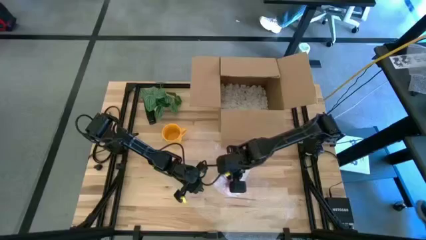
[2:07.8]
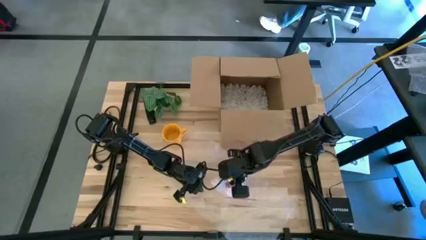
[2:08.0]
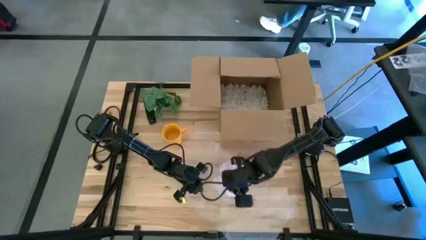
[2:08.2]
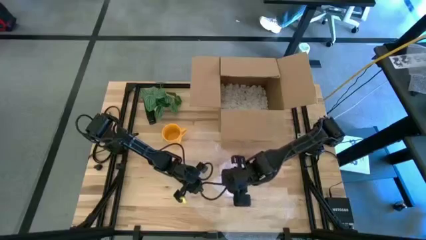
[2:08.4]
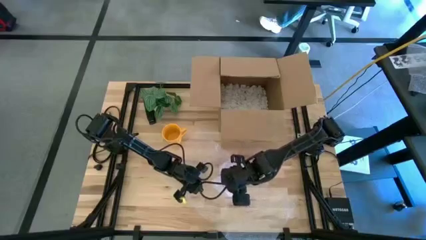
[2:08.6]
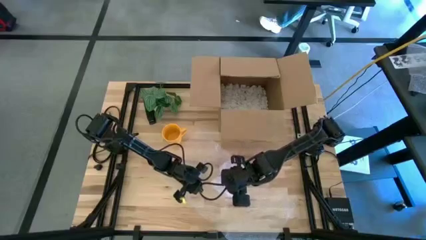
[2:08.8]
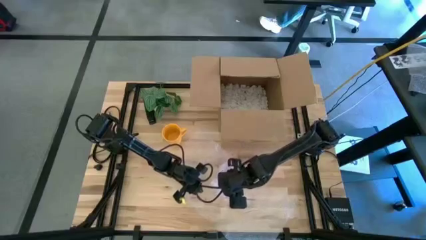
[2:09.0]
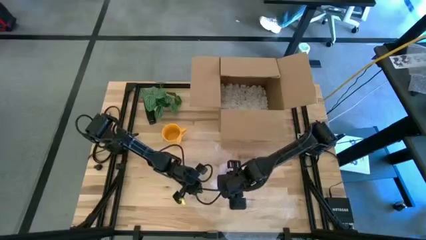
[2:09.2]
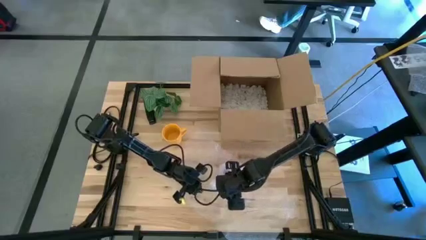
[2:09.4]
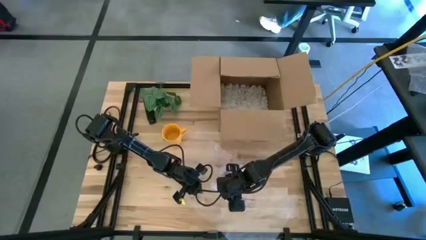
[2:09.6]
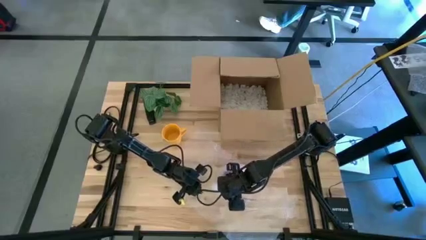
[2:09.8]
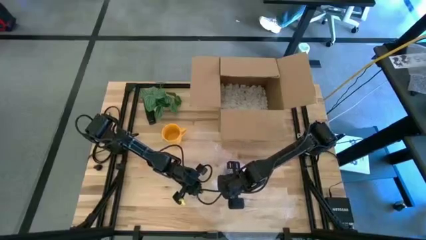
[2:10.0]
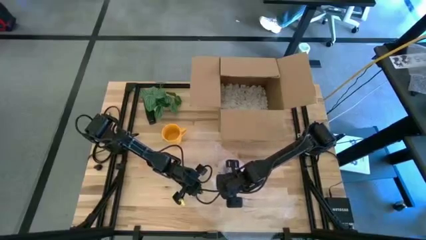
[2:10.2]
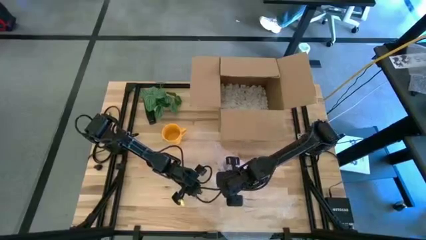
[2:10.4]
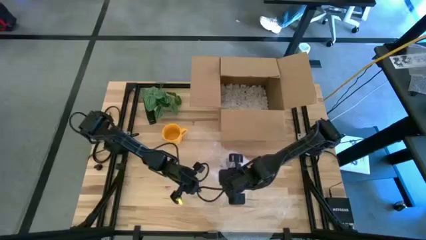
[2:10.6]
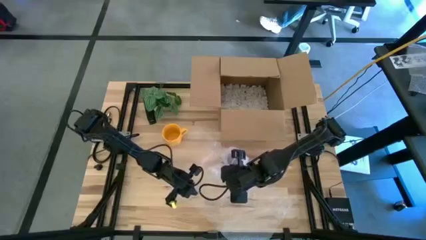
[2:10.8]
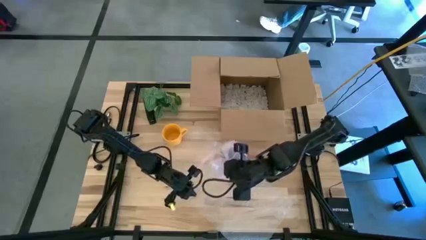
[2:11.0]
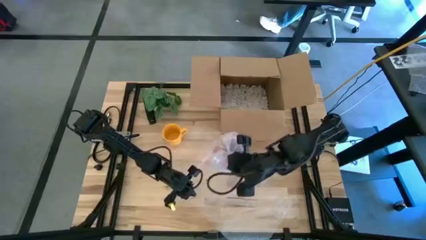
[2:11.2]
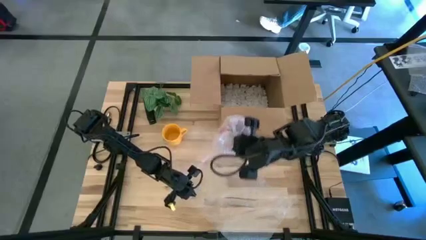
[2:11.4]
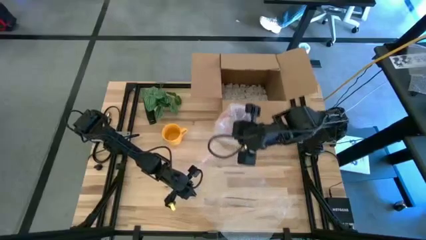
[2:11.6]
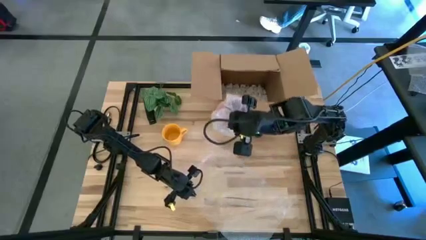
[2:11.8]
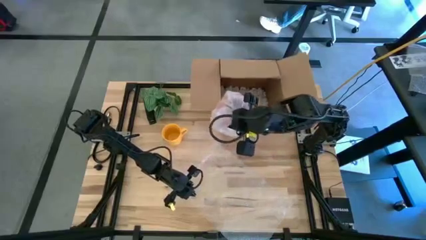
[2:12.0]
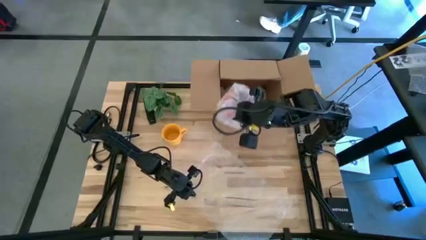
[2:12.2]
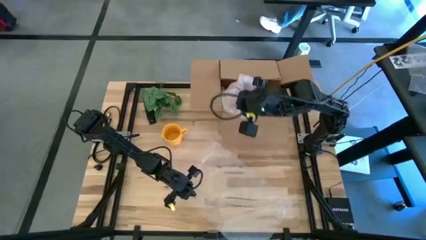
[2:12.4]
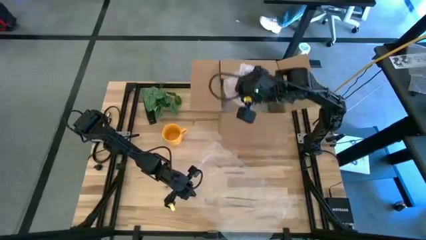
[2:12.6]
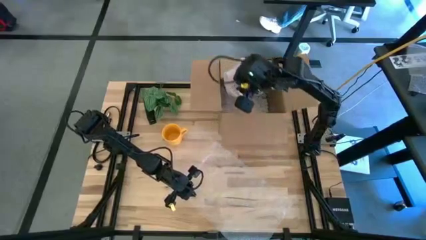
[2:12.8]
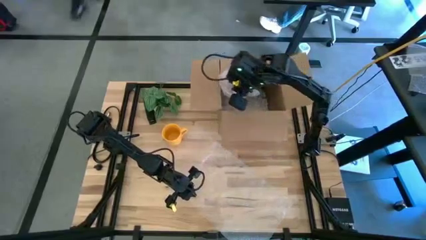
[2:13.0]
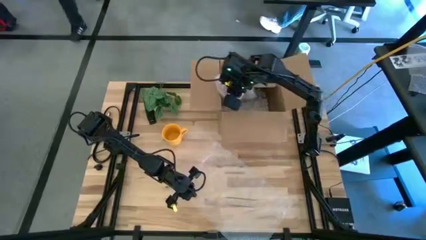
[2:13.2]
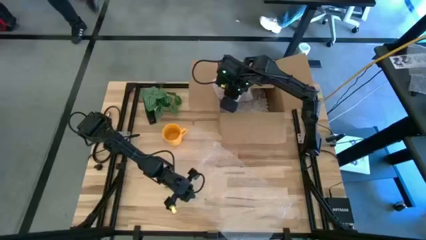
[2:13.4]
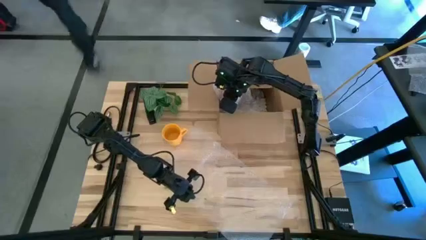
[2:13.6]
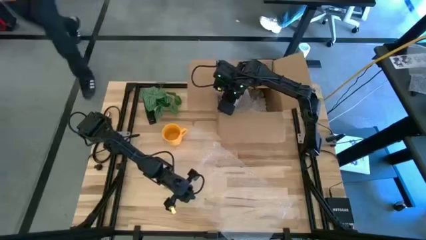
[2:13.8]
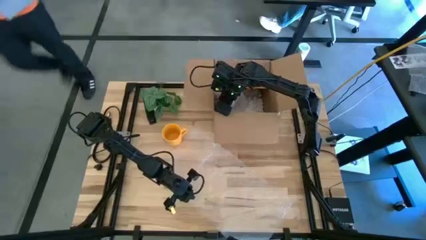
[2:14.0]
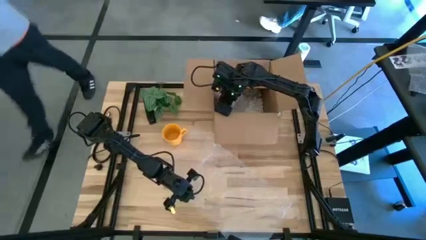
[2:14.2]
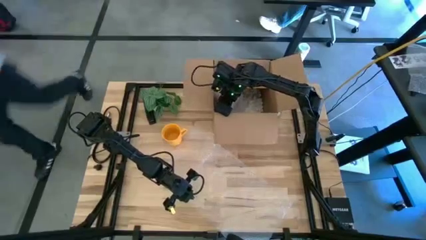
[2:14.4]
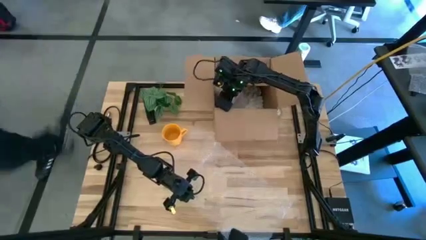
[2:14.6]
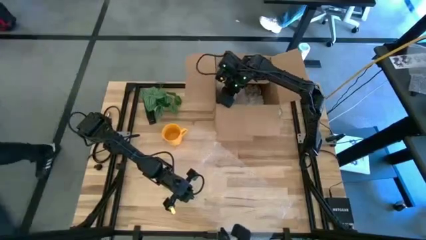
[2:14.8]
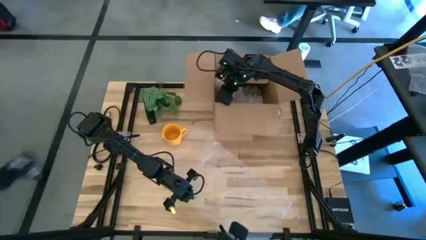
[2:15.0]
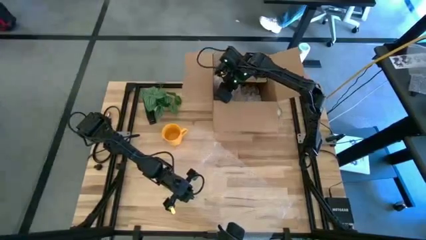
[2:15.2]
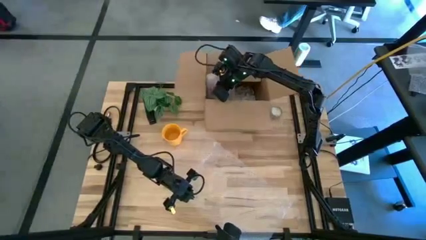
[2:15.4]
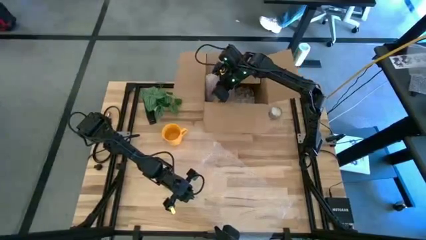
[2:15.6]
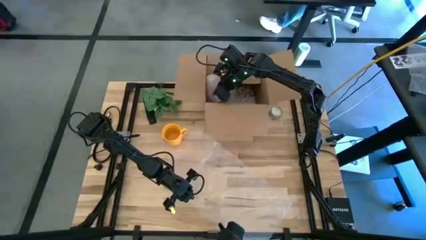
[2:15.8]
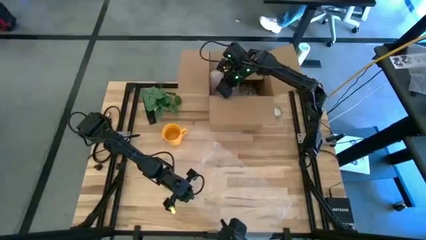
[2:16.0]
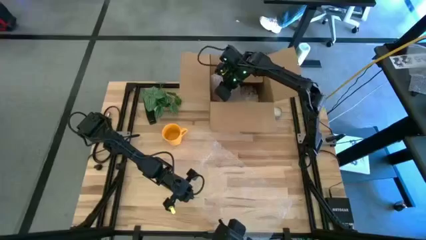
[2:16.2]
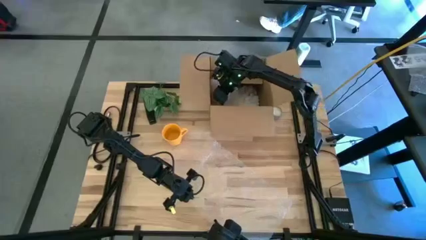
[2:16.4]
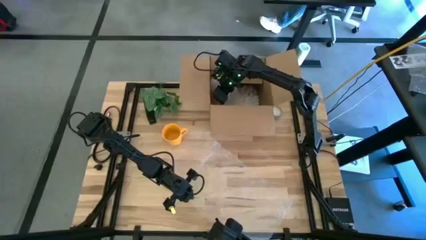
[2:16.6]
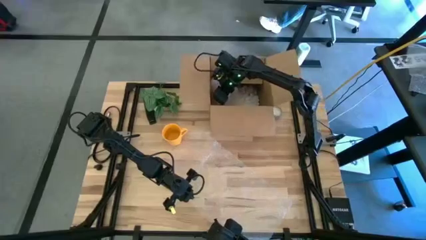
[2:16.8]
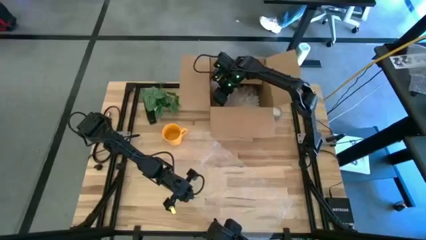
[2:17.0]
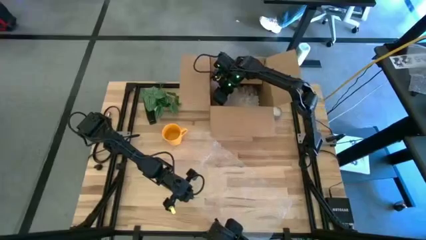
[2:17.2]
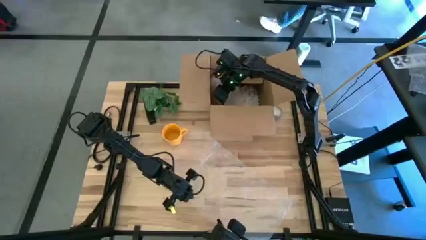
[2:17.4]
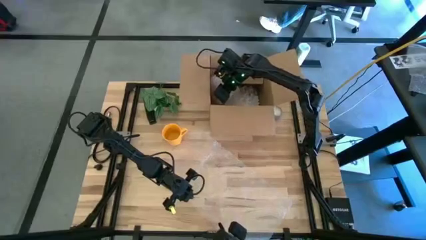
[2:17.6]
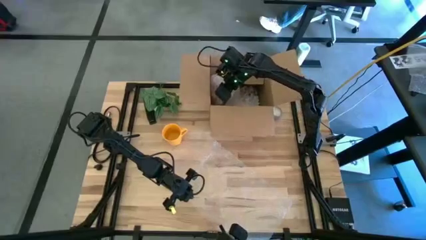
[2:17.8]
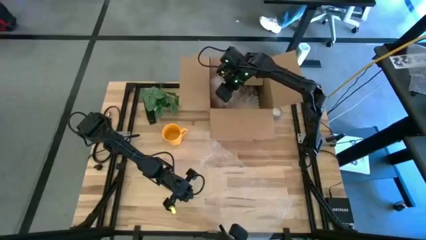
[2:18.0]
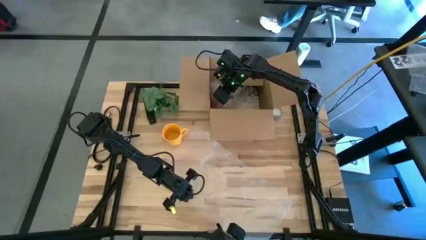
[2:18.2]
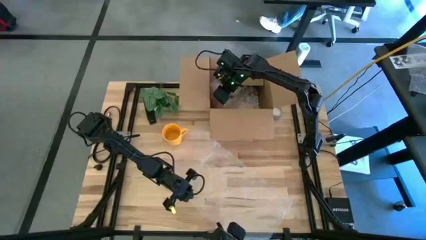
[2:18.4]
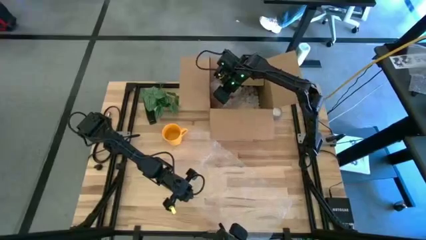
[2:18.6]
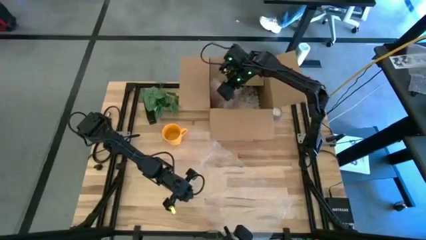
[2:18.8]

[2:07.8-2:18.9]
Task: wrap mug
Put the wrapped orange mug into the cardboard box

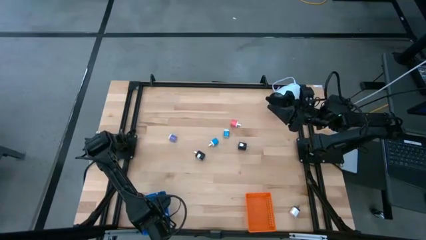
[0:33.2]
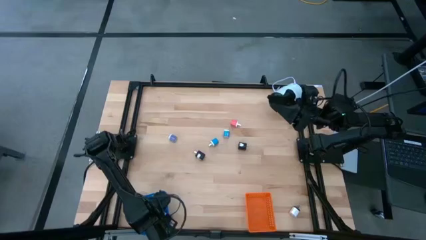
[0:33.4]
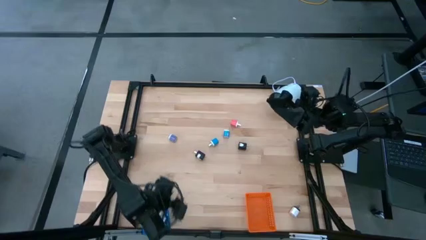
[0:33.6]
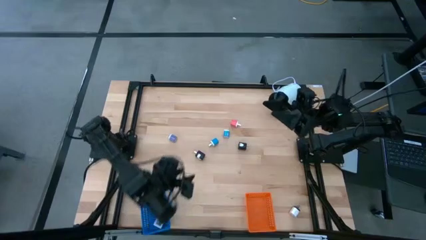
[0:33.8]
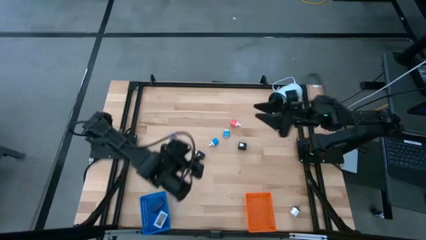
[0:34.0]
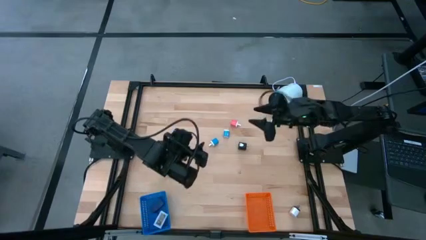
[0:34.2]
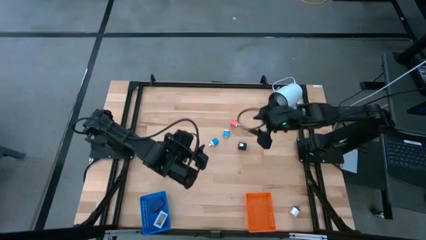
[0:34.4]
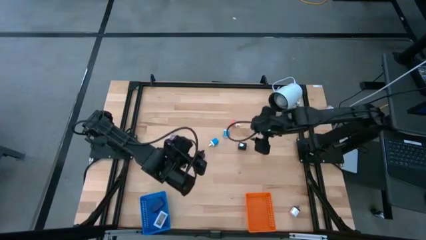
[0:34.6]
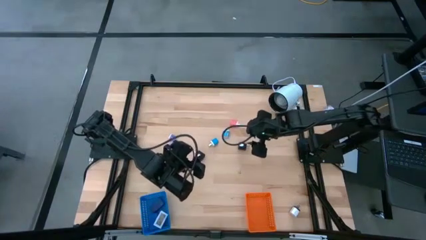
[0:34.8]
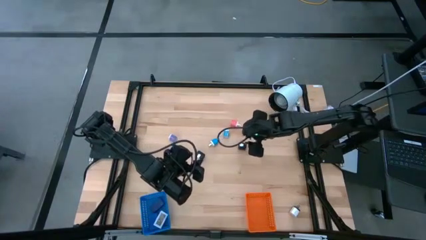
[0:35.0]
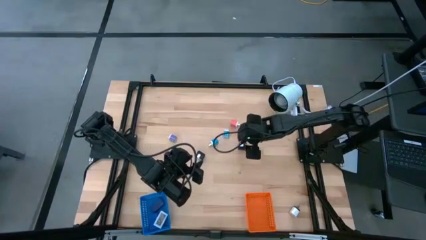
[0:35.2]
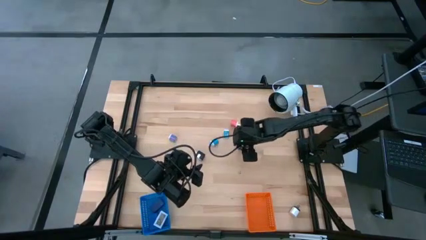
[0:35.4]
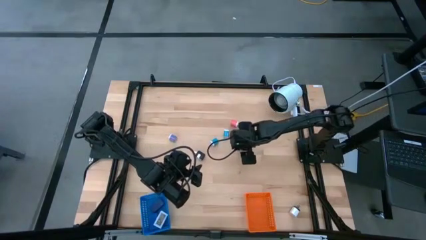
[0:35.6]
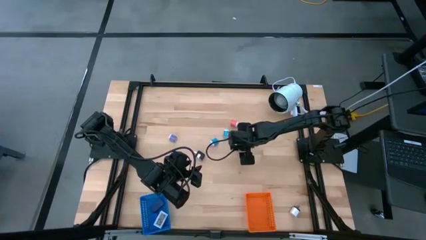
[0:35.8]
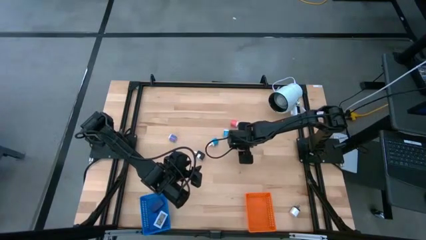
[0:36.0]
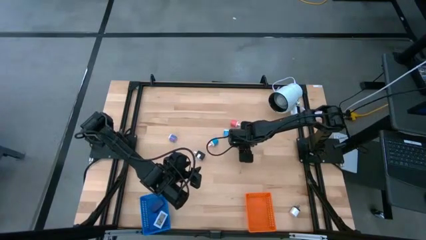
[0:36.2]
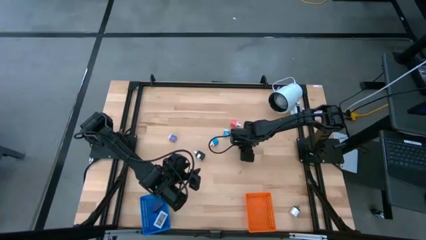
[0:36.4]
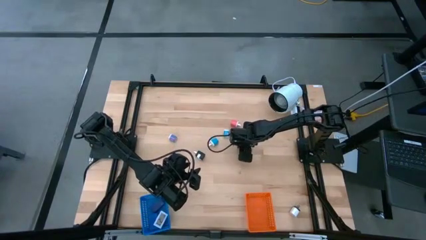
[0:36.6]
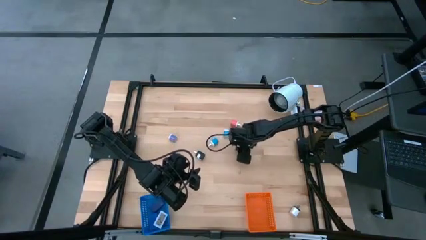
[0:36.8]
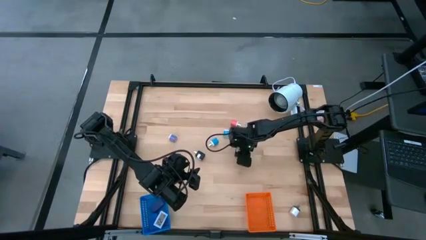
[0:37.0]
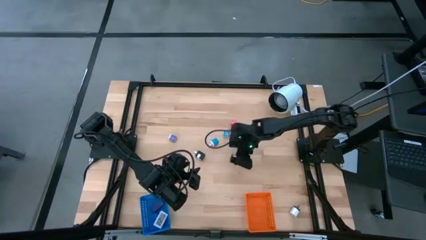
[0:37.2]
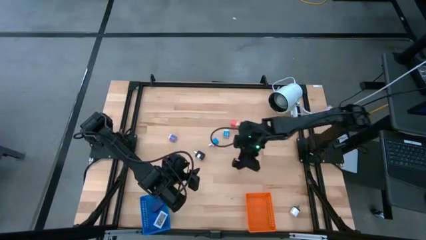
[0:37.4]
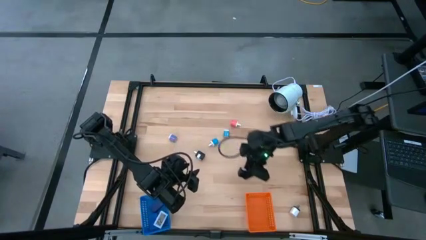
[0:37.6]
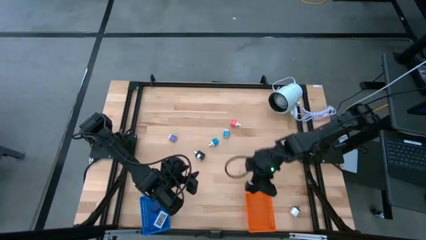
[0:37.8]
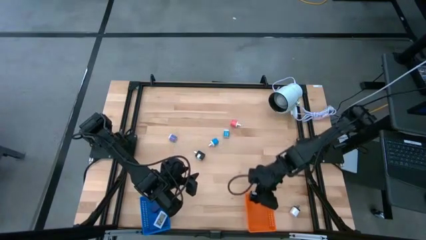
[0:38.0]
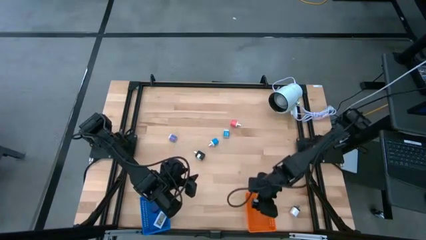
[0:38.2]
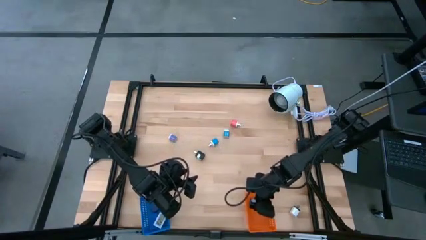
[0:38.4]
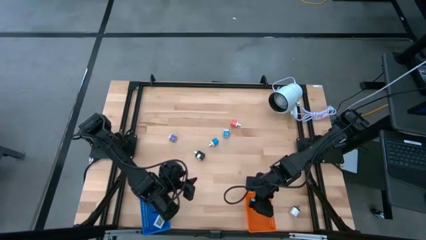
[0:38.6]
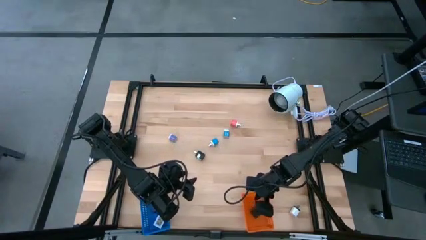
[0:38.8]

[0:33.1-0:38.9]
Task: Pick & Place Office items
Put the right black charger adapter into the orange bin
